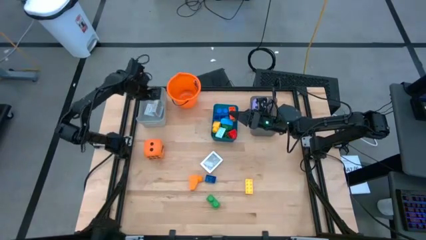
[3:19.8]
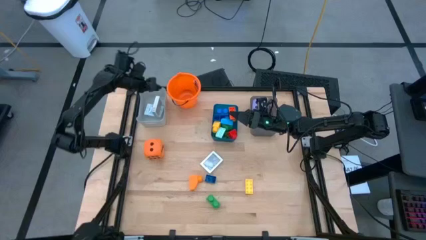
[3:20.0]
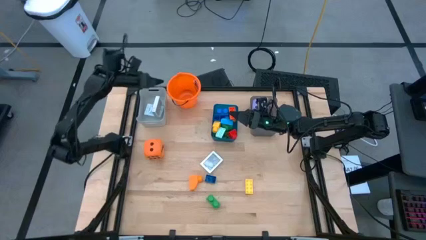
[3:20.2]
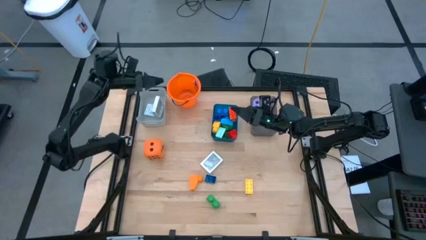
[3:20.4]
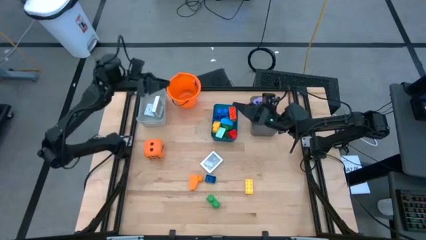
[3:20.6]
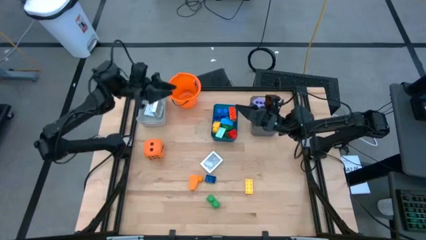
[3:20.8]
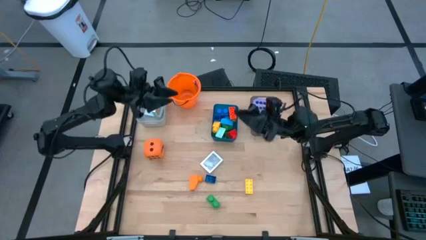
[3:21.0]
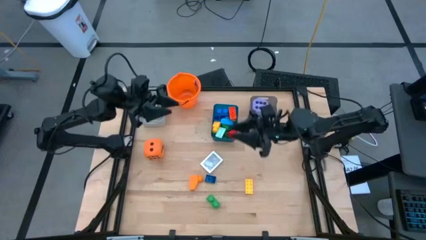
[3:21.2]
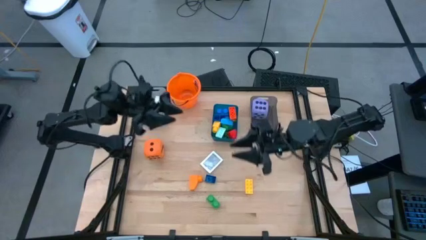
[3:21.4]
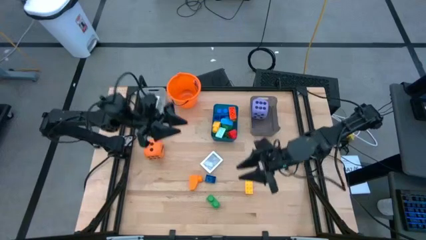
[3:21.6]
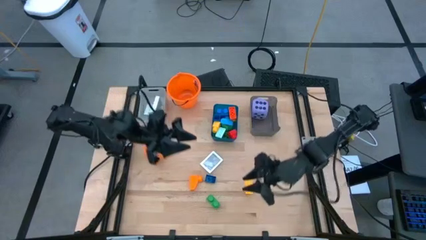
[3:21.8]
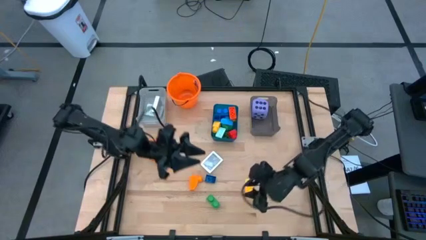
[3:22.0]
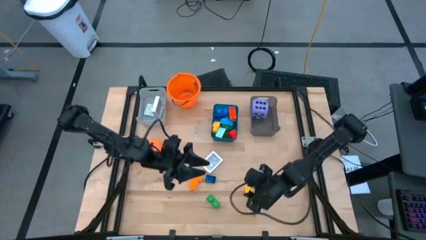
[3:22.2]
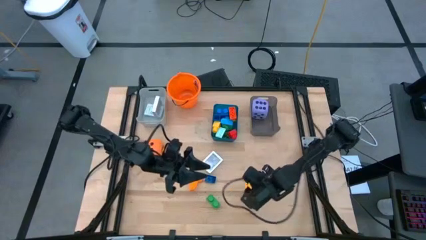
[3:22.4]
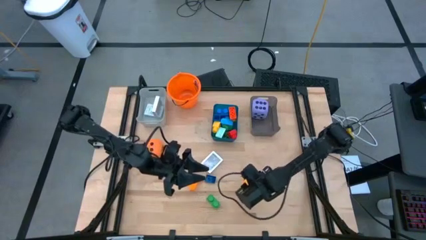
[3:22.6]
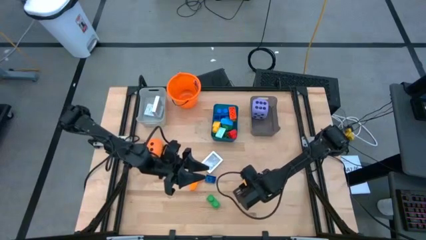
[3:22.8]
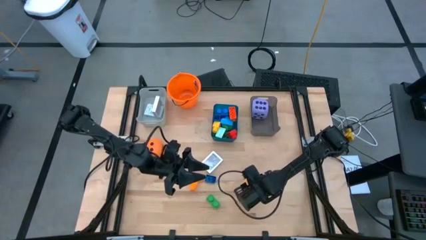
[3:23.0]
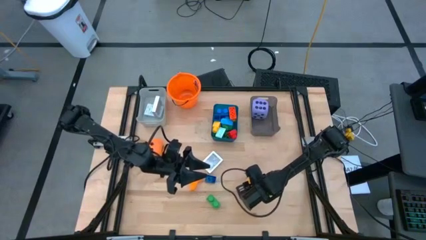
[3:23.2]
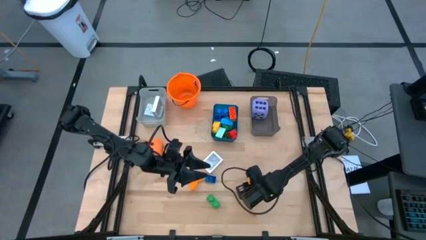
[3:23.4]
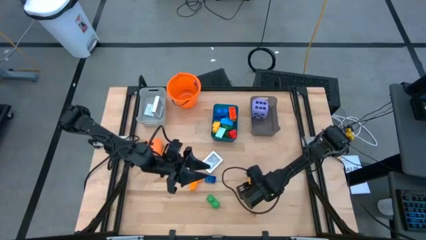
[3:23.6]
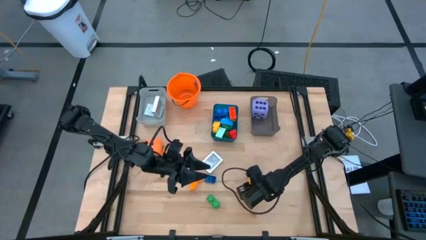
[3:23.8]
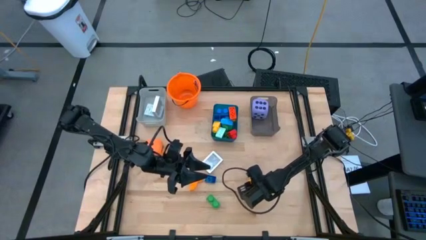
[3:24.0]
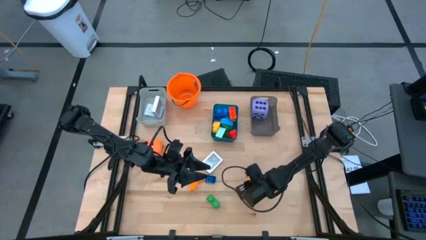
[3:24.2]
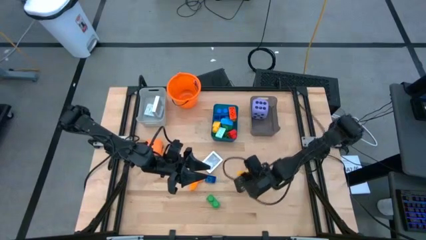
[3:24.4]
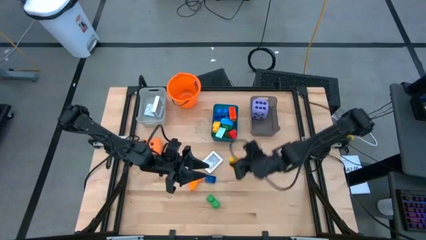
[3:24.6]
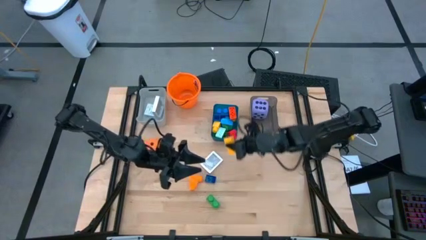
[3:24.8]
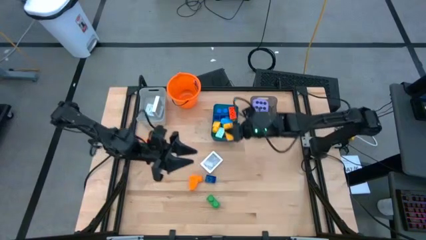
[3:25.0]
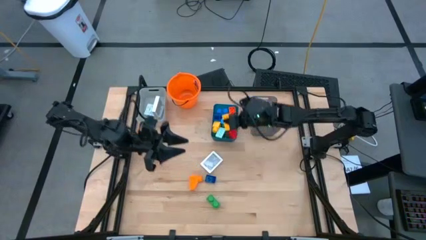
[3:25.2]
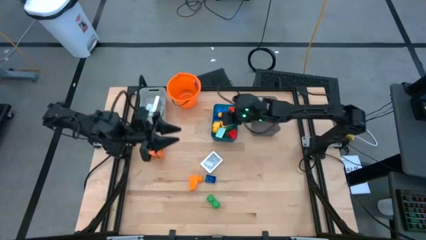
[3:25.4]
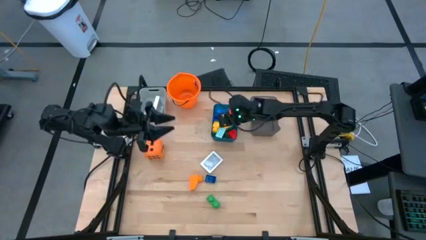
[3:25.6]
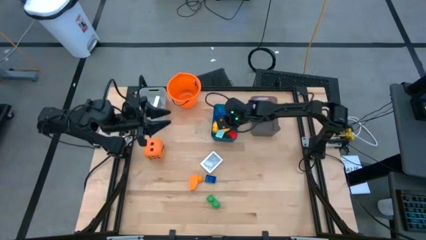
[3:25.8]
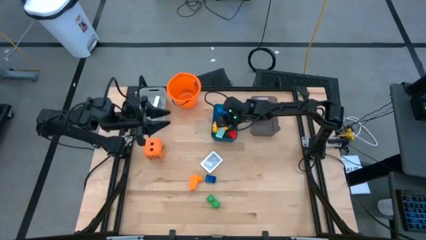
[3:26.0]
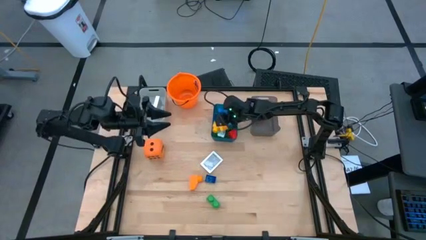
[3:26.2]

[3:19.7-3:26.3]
Task: Pick & Place Toys
Put the yellow game piece into the blue bin

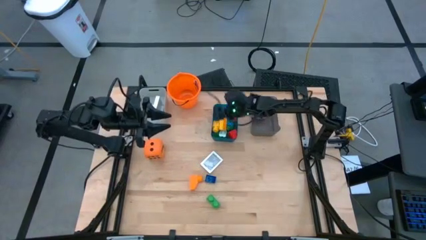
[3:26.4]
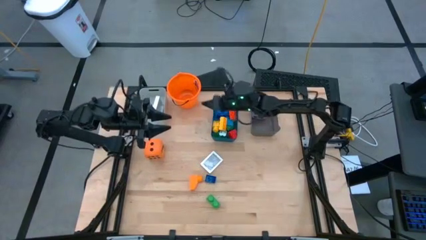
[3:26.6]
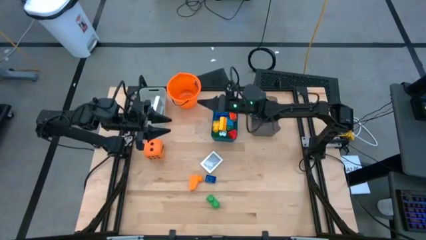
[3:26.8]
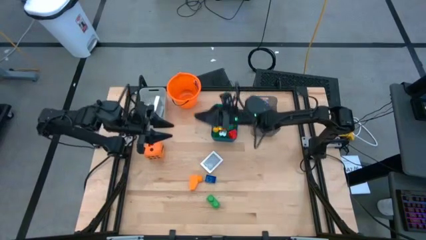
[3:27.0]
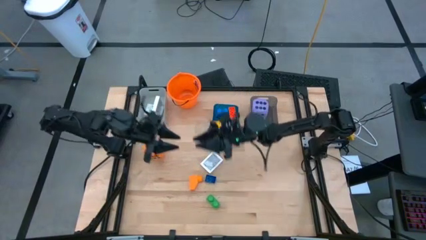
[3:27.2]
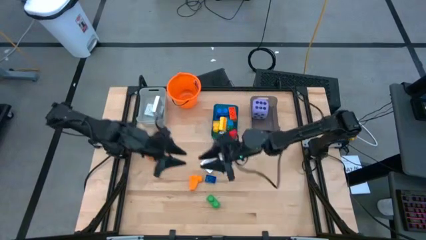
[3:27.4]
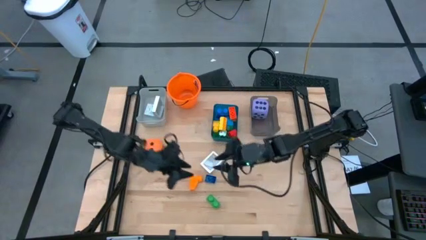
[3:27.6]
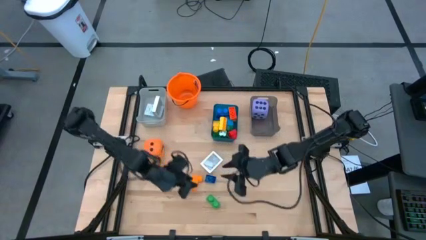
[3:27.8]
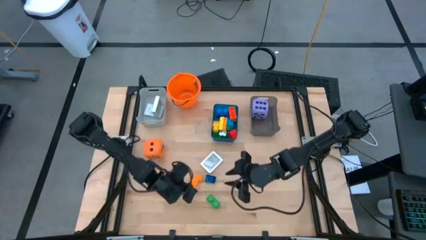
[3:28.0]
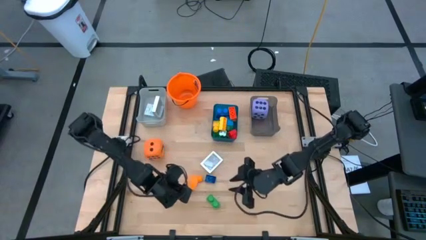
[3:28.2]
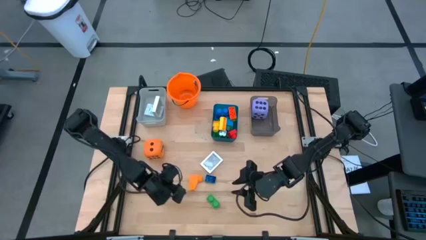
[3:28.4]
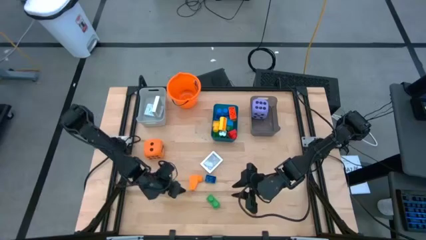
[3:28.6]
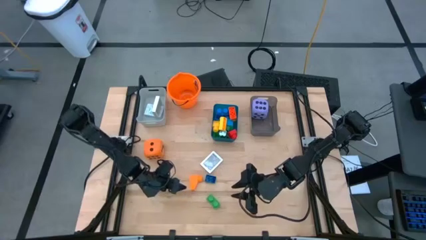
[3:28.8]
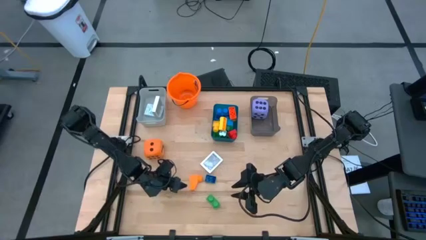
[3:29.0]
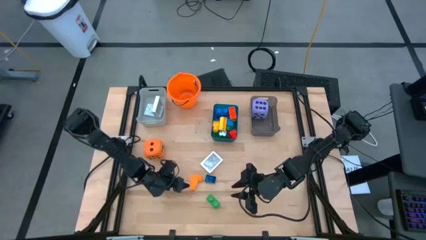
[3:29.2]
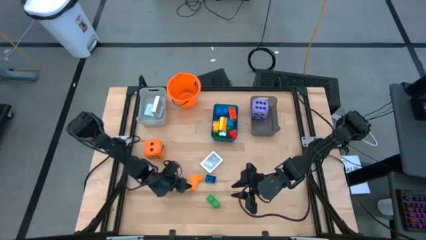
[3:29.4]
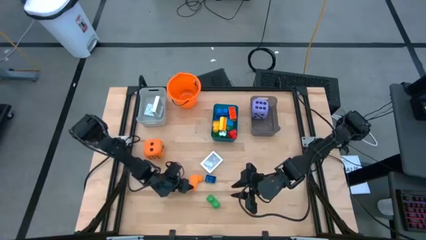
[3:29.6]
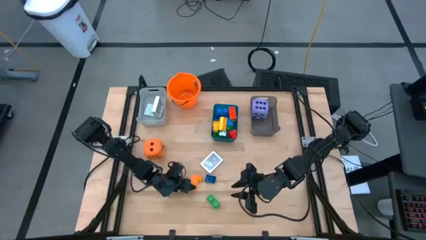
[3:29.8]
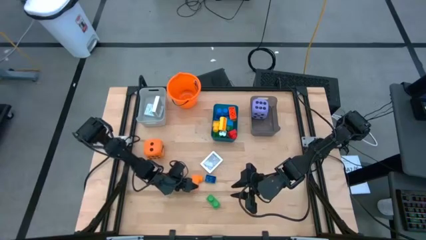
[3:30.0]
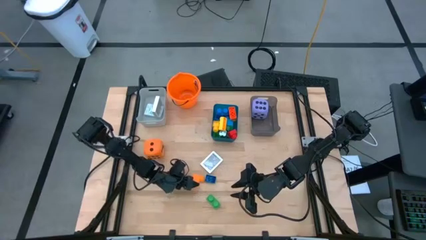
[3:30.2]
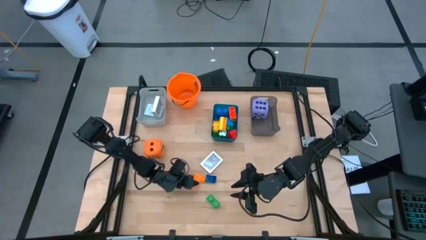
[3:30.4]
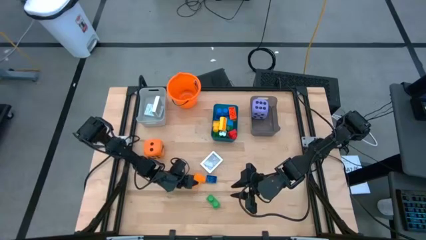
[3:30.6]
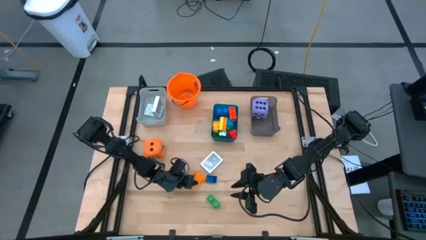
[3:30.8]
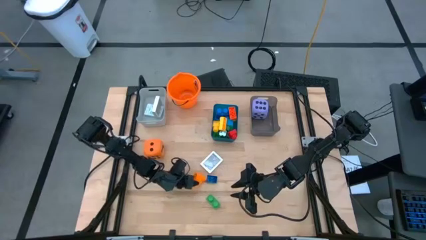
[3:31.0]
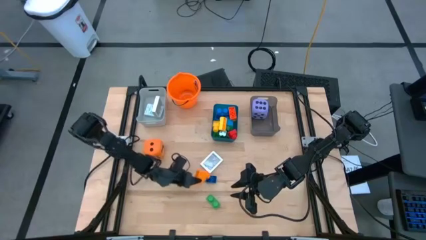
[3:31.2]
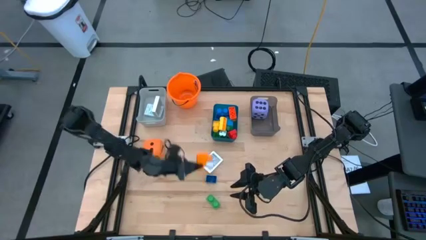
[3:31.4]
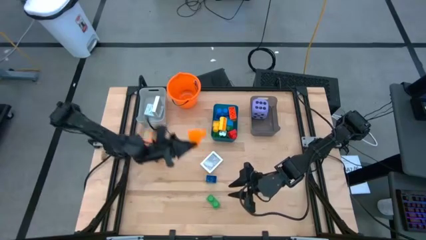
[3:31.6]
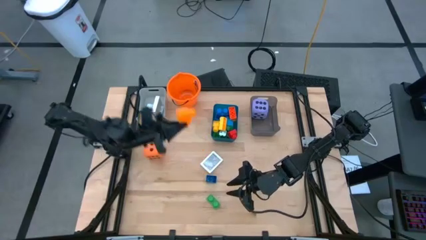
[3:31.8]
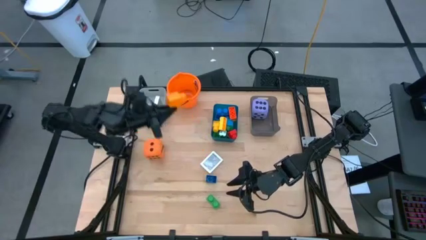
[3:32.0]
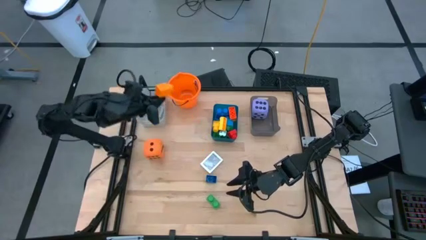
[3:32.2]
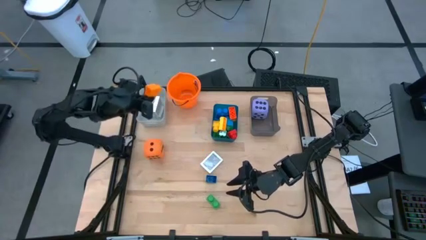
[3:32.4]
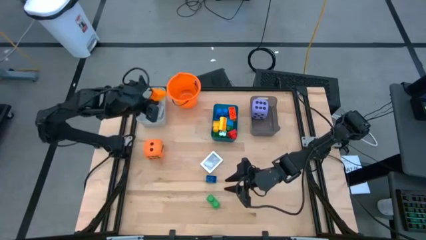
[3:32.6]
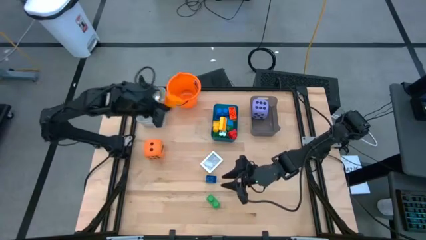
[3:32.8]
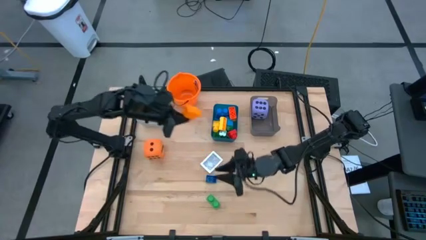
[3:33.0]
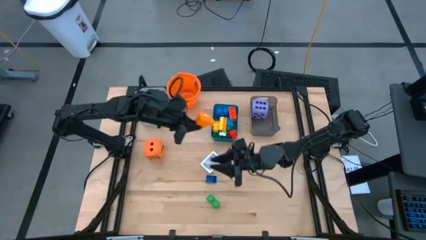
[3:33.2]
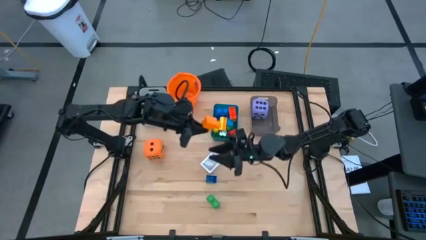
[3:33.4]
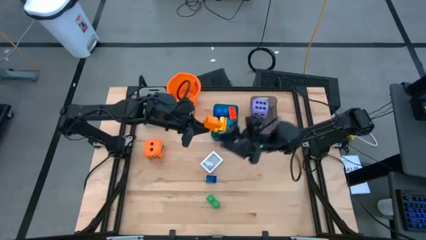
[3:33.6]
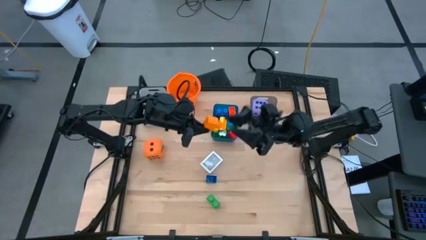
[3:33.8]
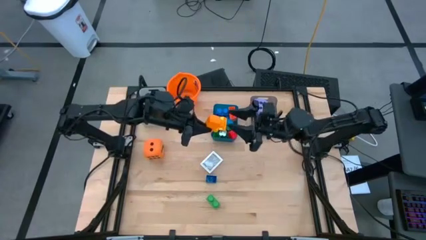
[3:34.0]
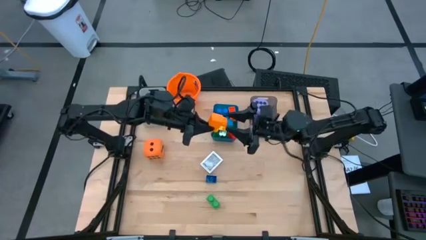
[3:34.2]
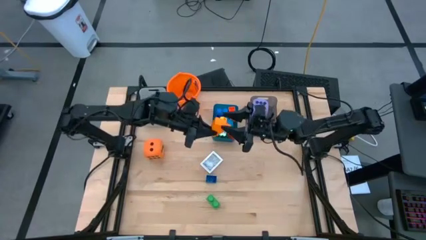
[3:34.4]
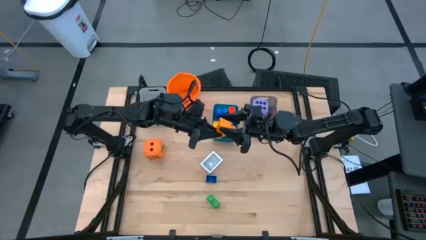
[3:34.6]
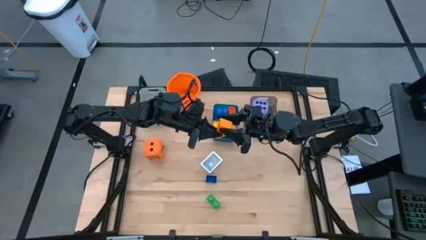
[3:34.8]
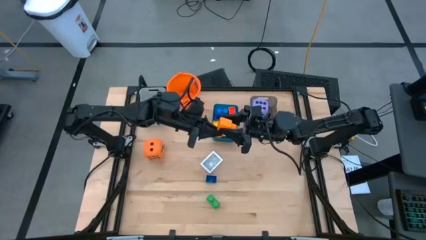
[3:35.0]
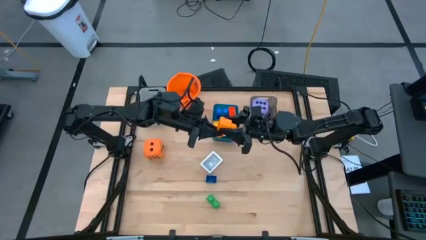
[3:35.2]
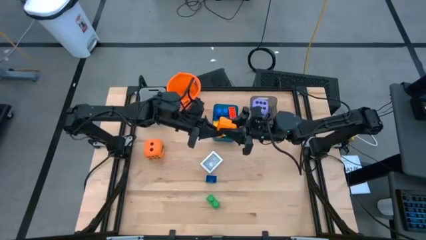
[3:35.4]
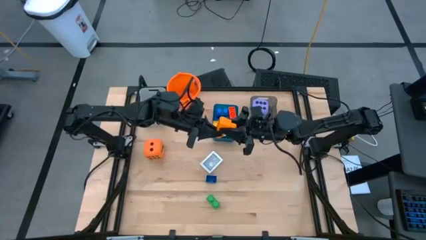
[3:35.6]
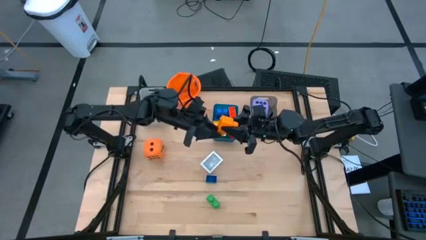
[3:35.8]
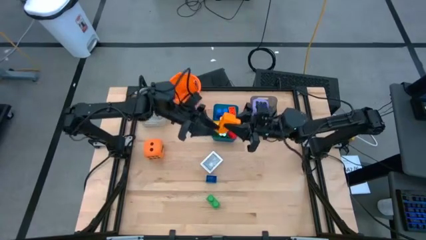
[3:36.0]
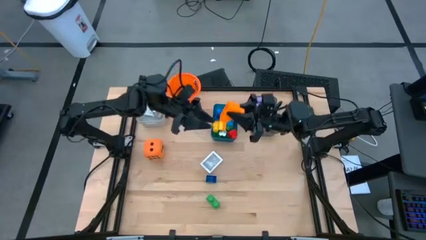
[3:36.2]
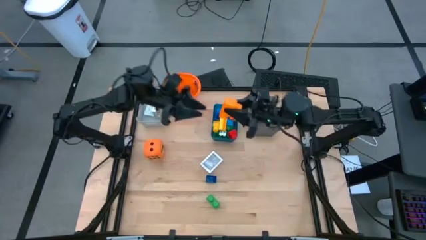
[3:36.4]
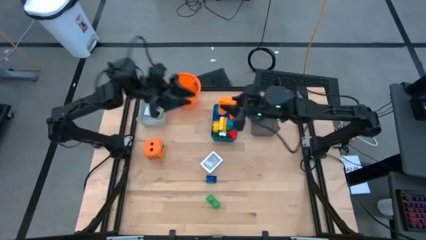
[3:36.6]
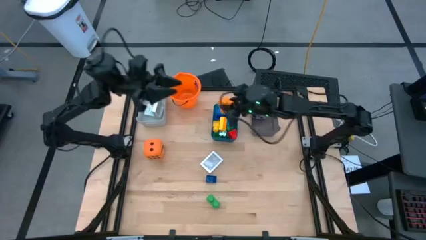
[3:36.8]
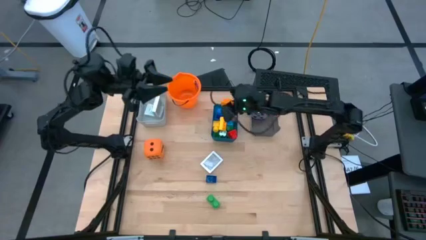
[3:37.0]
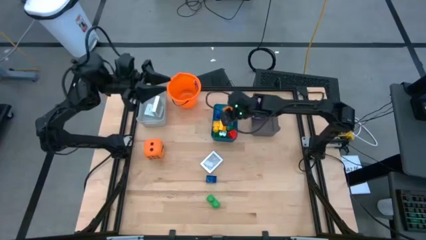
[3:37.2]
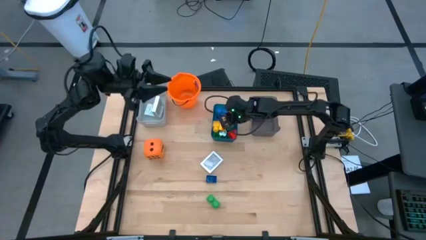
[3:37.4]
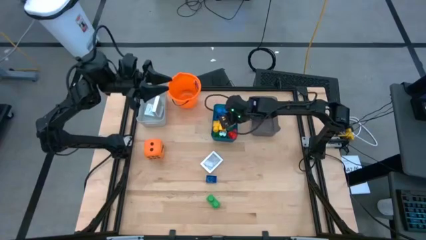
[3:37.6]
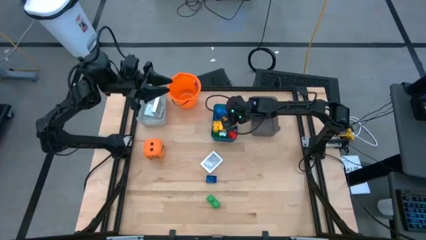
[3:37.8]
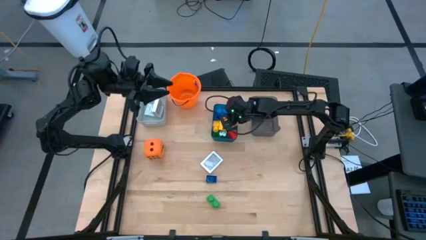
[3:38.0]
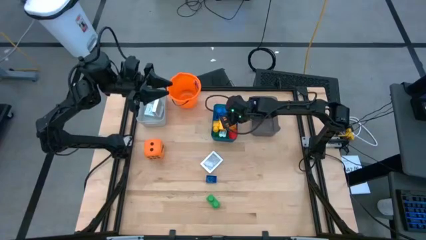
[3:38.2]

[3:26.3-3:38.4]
Put the orange game piece into the blue bin
